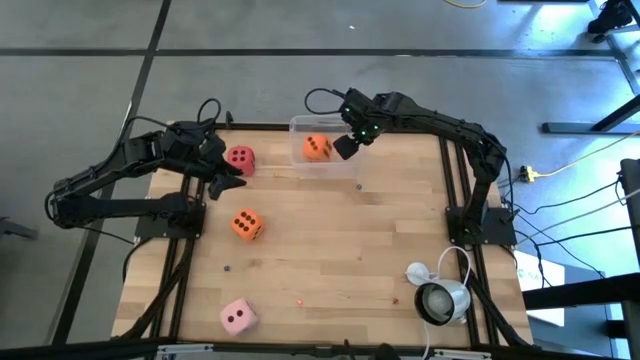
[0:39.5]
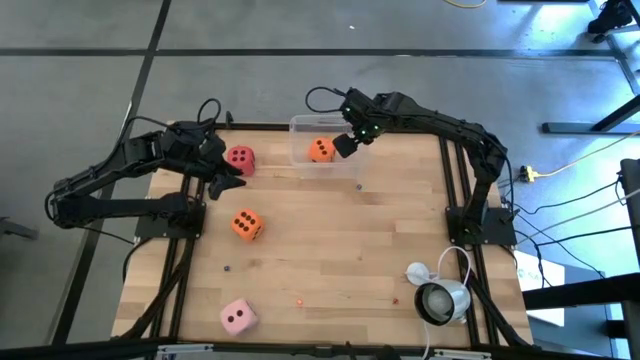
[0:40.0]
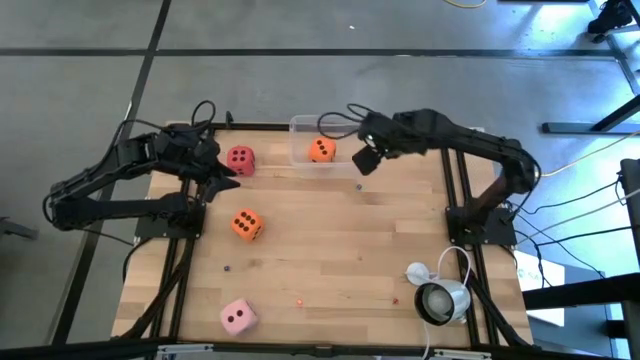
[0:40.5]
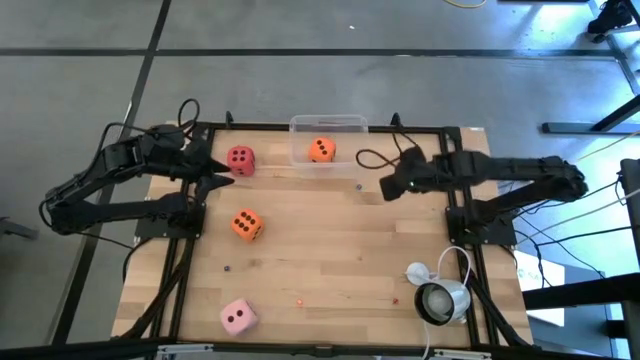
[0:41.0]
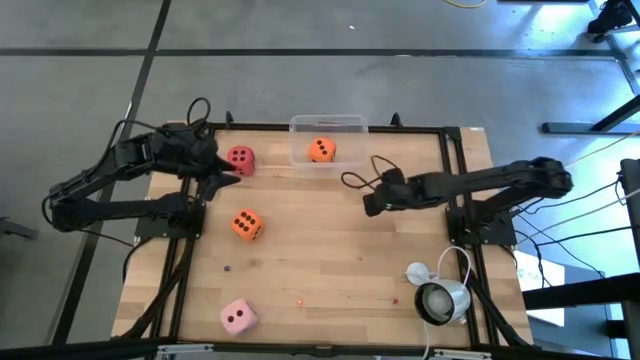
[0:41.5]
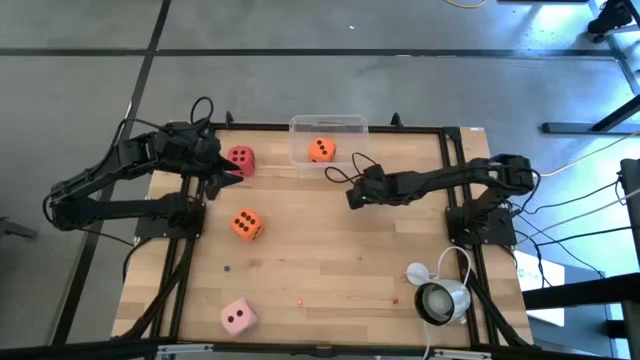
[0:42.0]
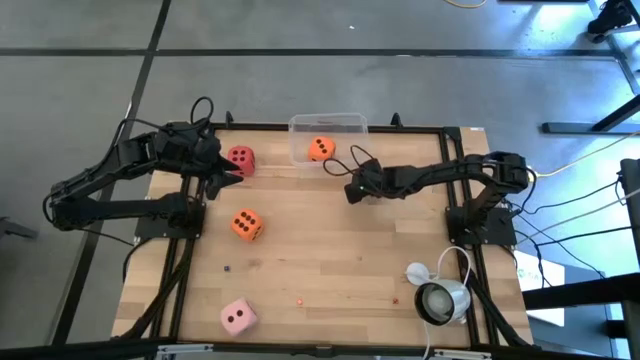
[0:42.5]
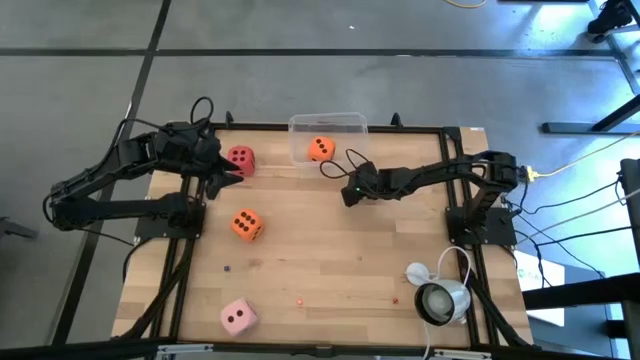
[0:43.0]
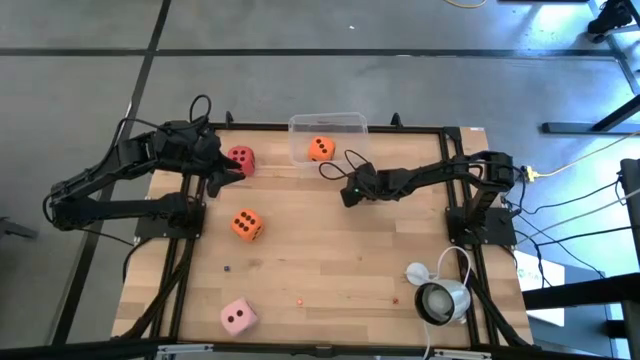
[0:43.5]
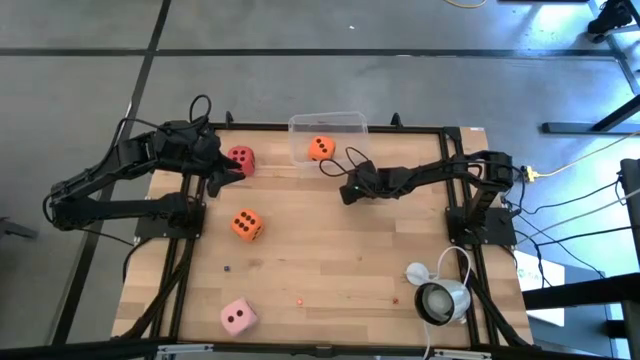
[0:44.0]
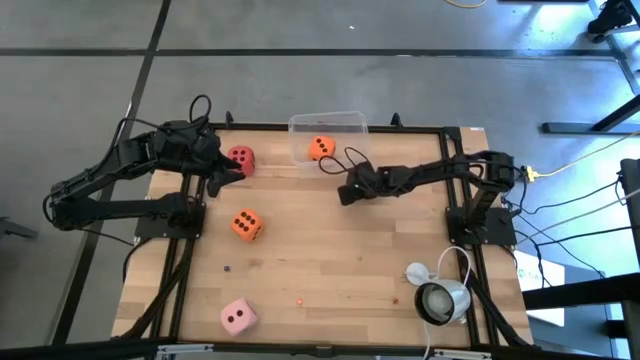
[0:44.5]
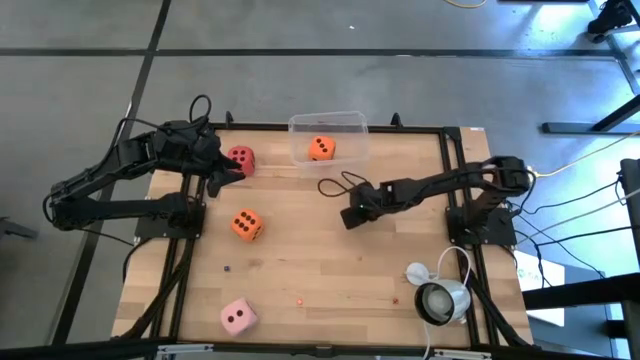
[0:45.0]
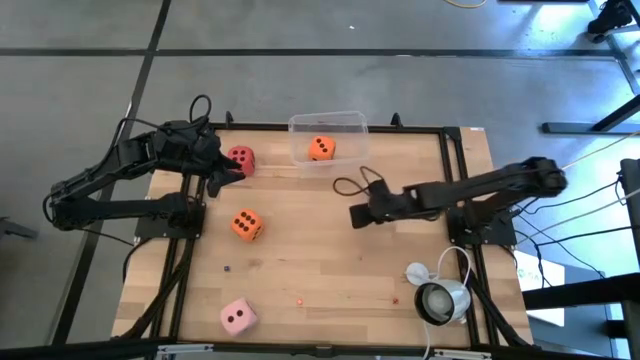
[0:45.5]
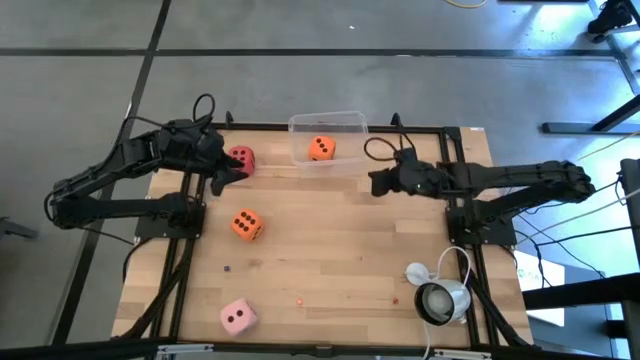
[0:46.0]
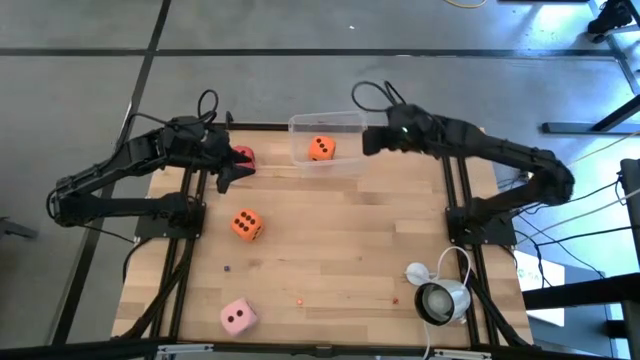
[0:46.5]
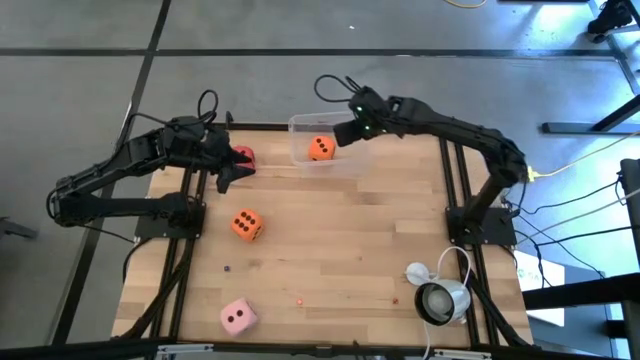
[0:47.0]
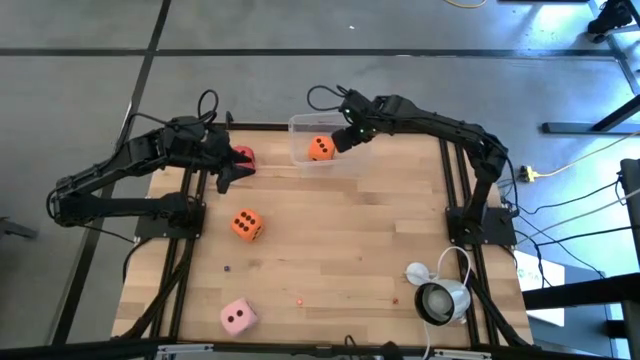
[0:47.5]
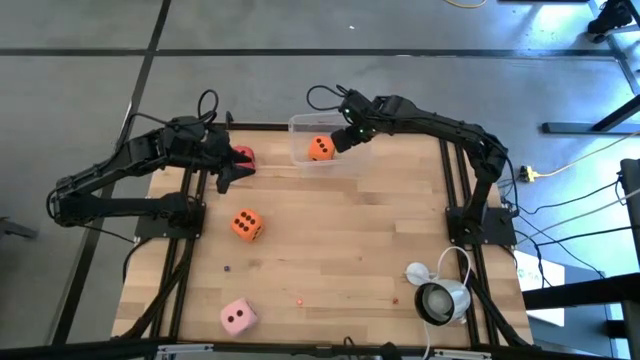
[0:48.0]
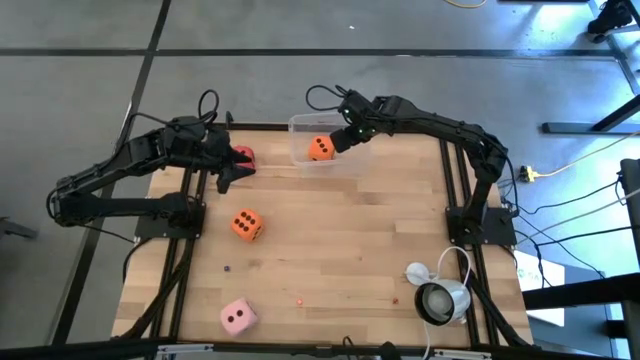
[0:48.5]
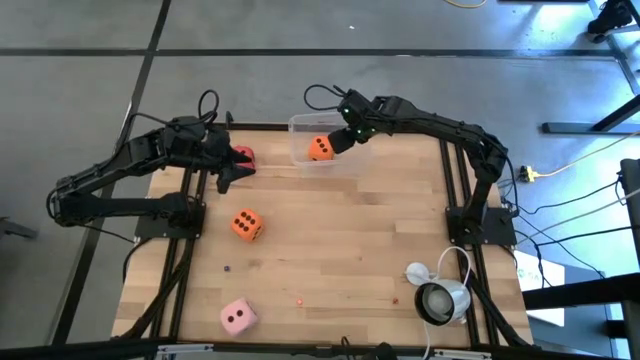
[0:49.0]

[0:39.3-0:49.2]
Task: Pick & Place Dice
Put the small blue dice into the transparent bin

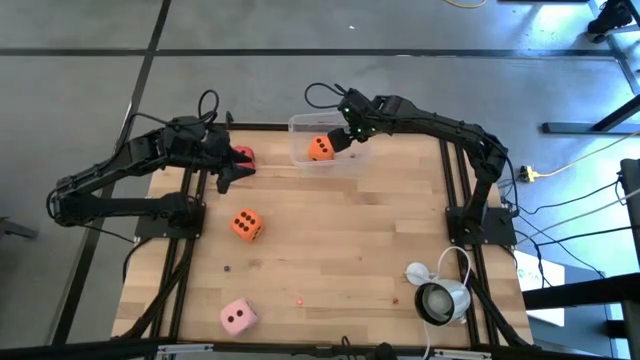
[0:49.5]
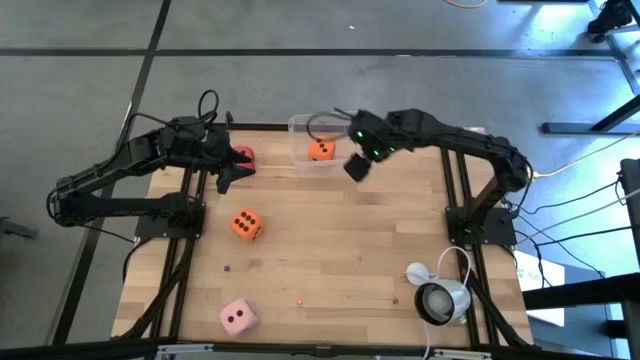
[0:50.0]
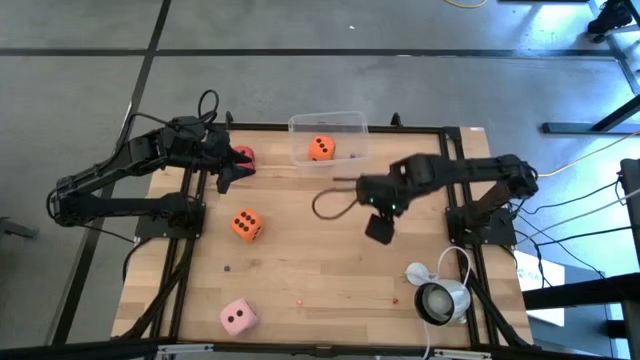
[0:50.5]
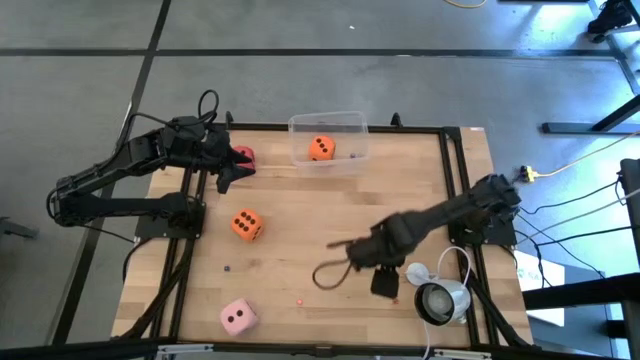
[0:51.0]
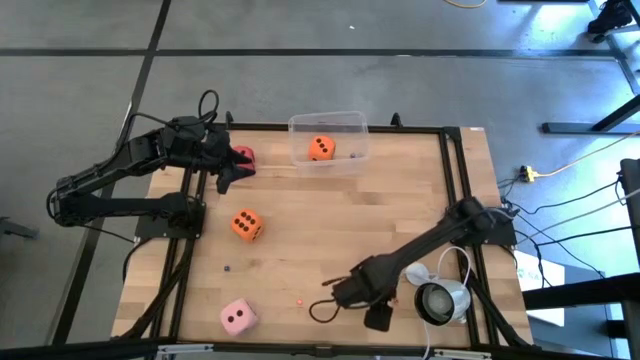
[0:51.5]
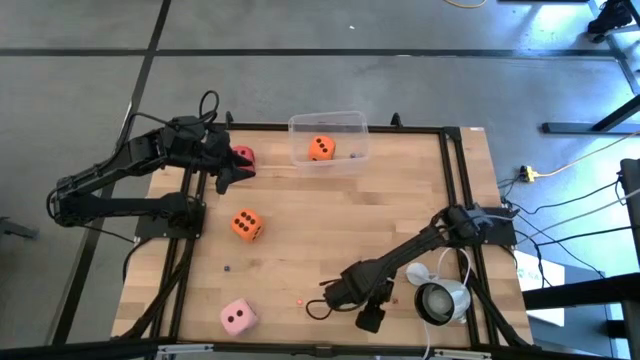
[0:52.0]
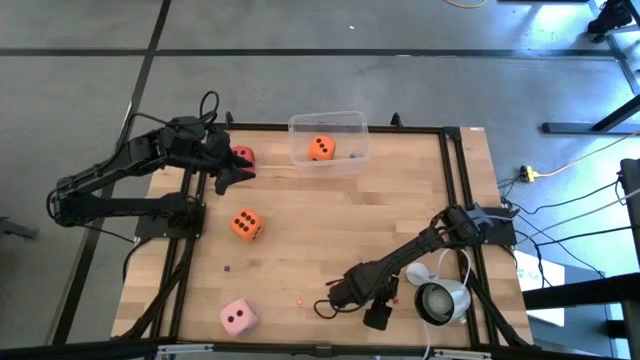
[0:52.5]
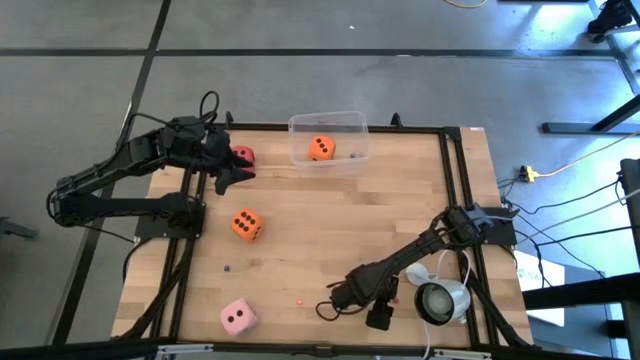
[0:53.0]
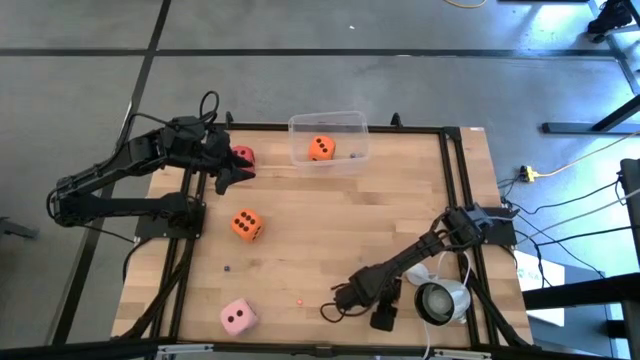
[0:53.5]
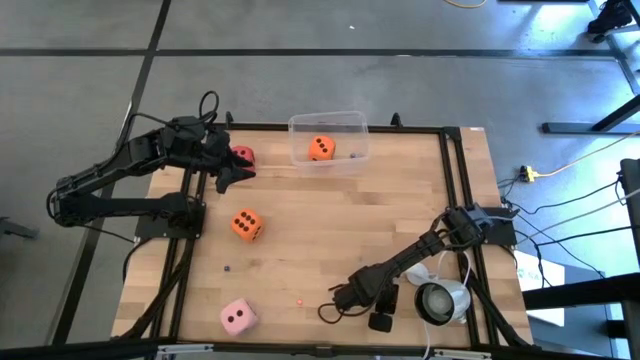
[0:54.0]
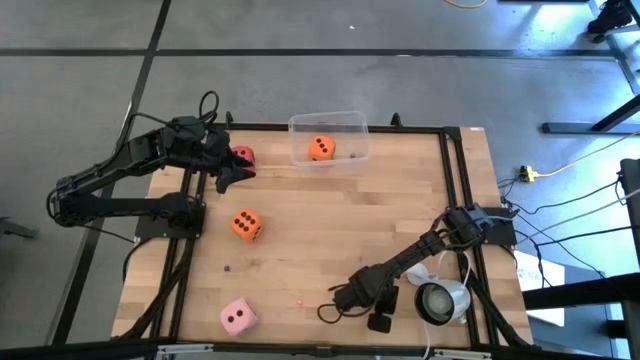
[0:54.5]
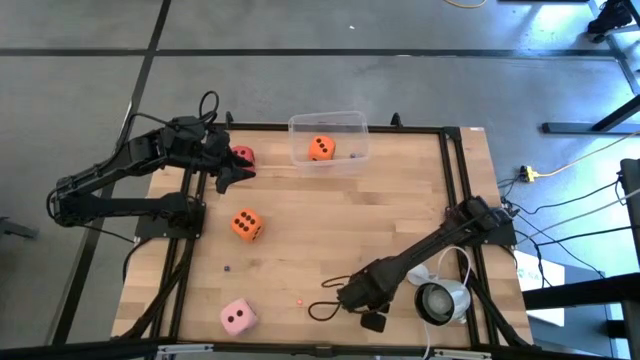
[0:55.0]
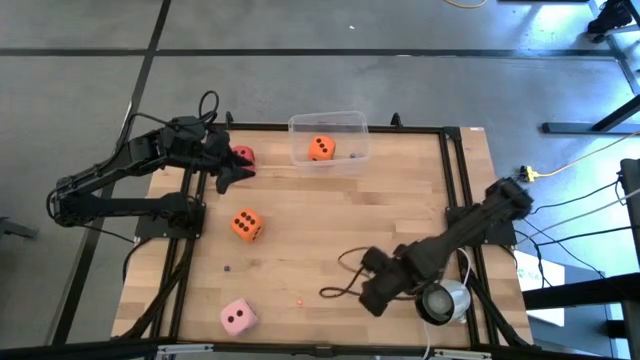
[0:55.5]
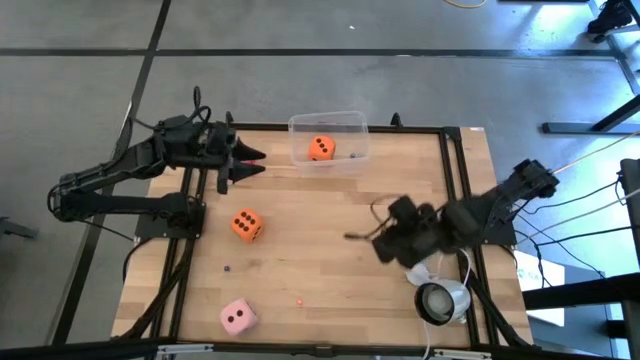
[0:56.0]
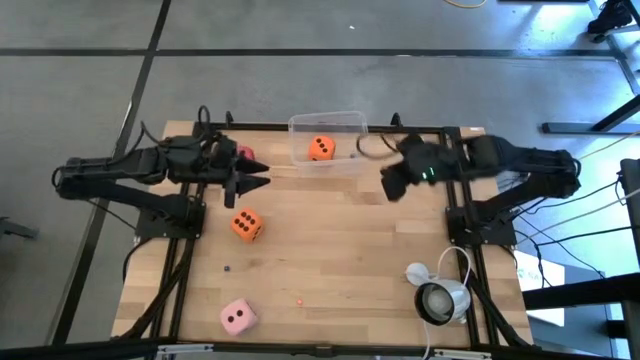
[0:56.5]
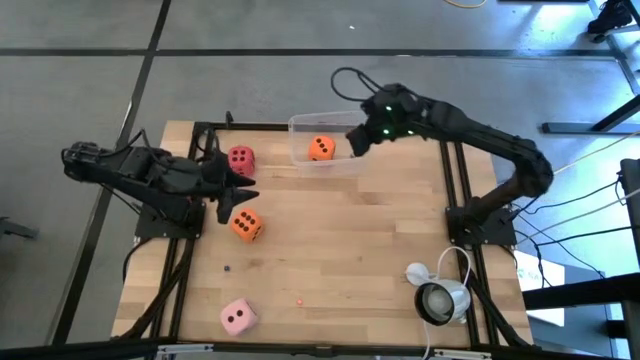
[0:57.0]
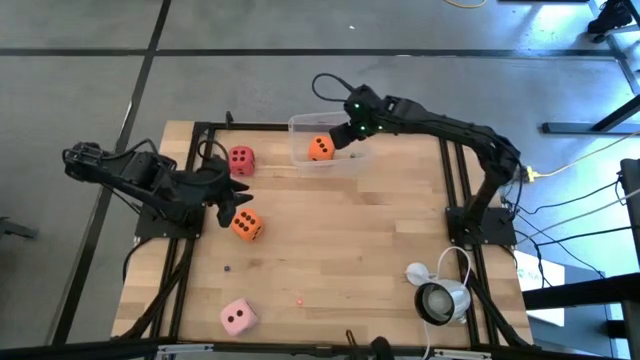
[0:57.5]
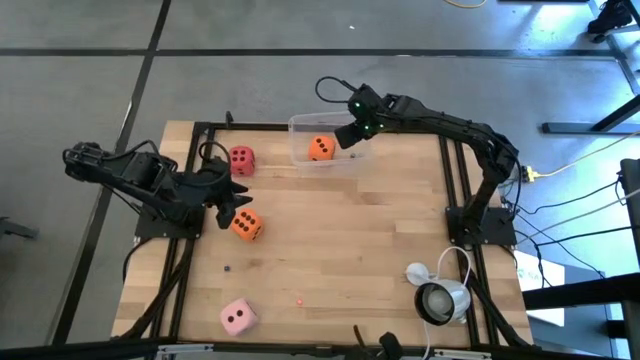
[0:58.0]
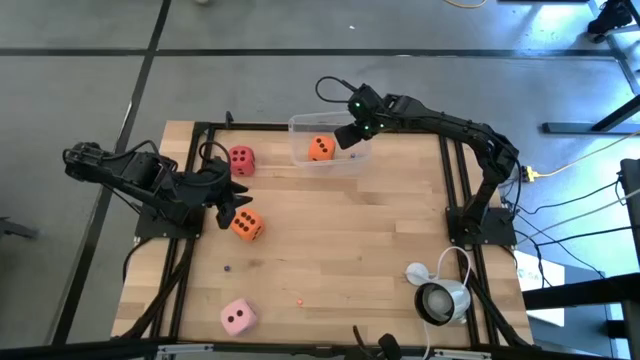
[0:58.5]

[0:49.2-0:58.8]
Put the small red dice into the transparent bin
